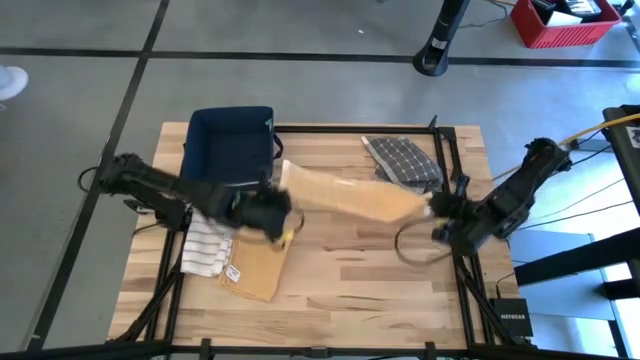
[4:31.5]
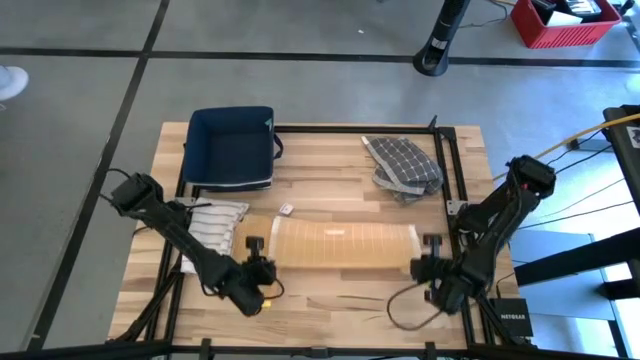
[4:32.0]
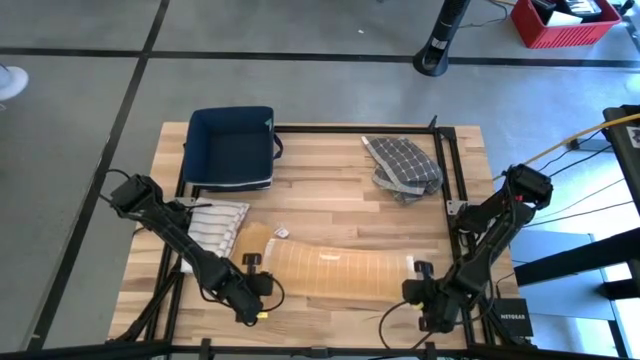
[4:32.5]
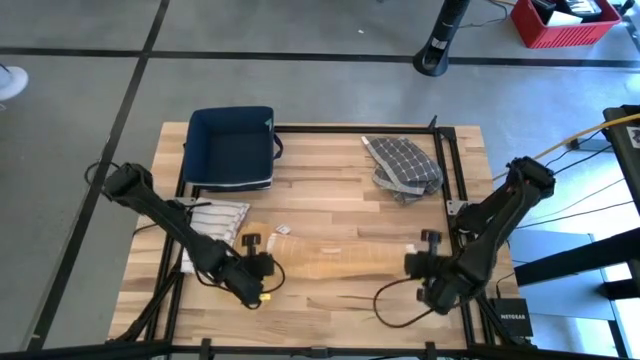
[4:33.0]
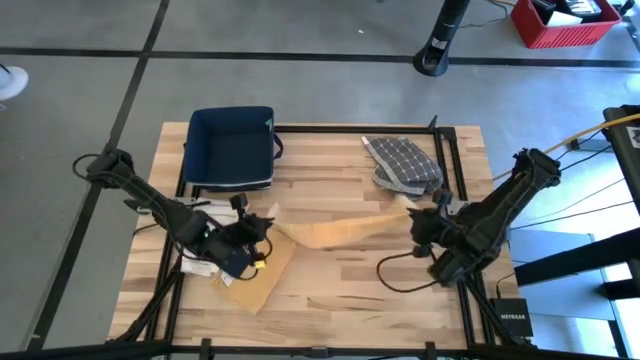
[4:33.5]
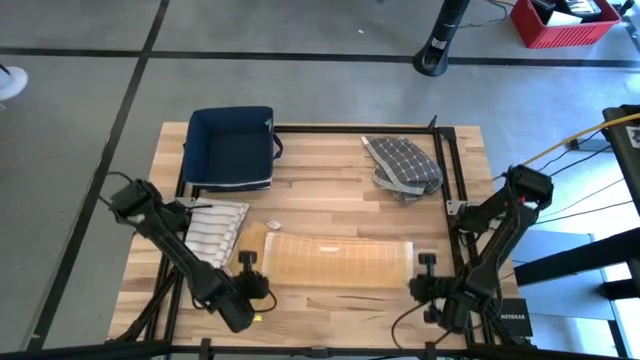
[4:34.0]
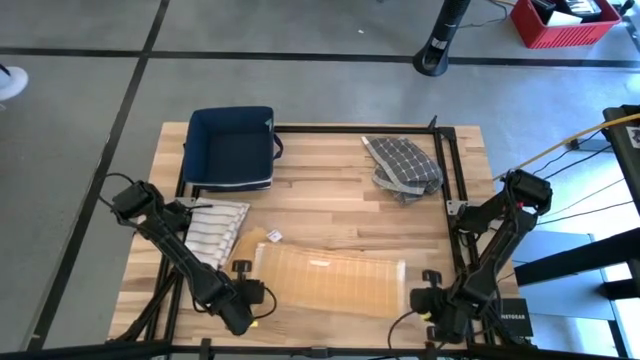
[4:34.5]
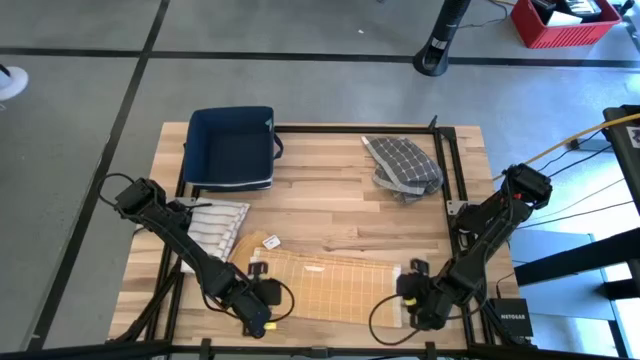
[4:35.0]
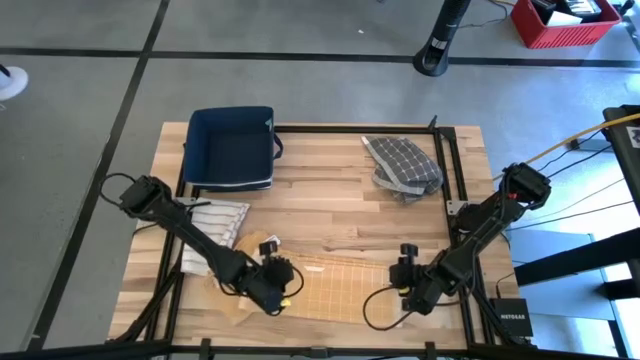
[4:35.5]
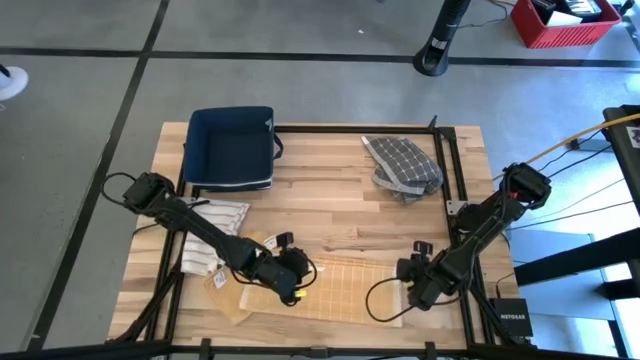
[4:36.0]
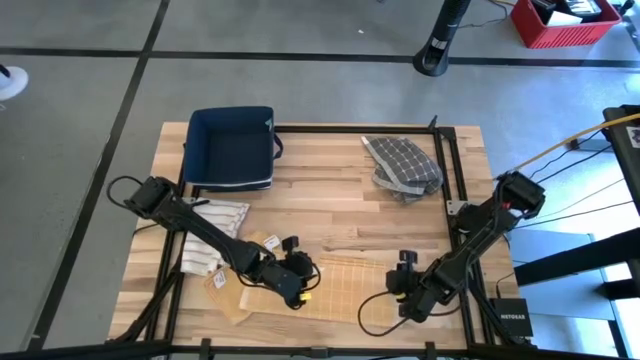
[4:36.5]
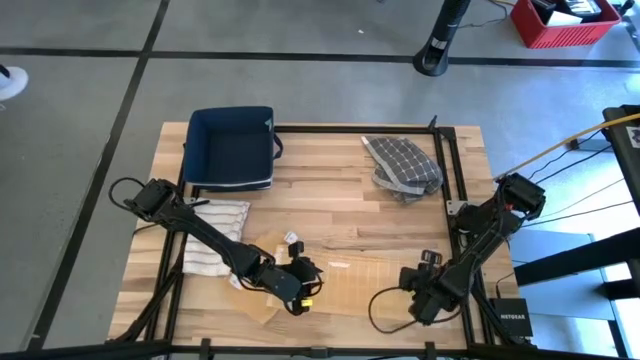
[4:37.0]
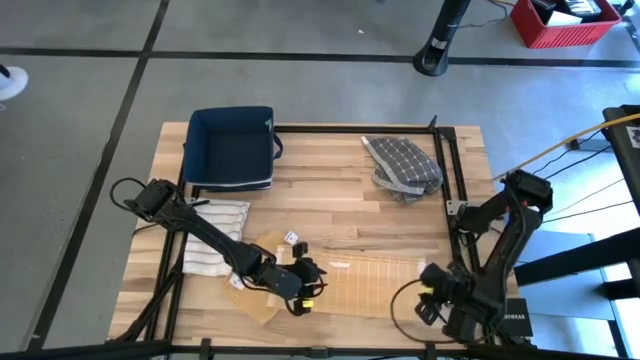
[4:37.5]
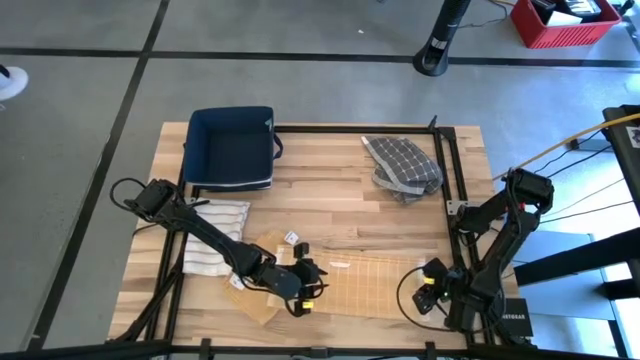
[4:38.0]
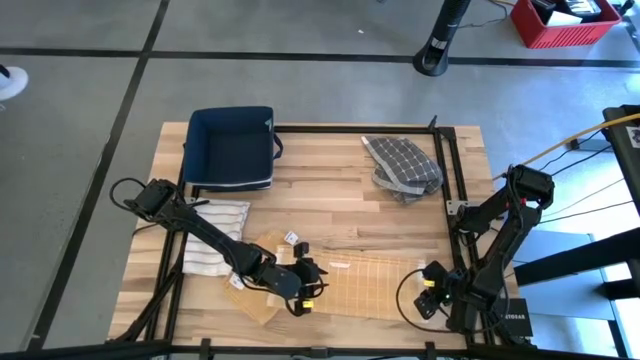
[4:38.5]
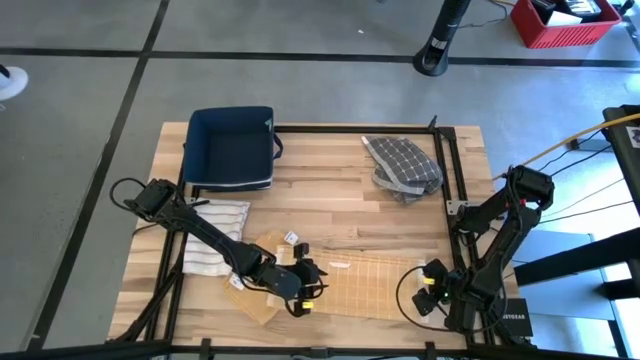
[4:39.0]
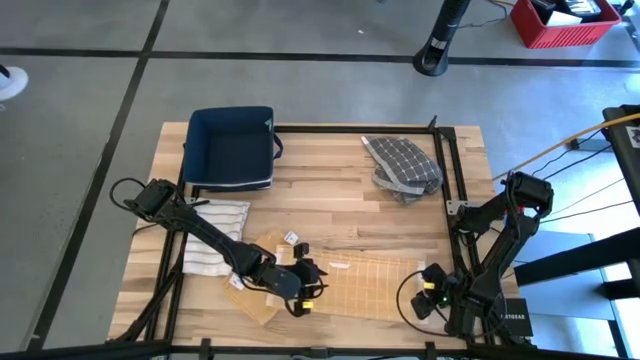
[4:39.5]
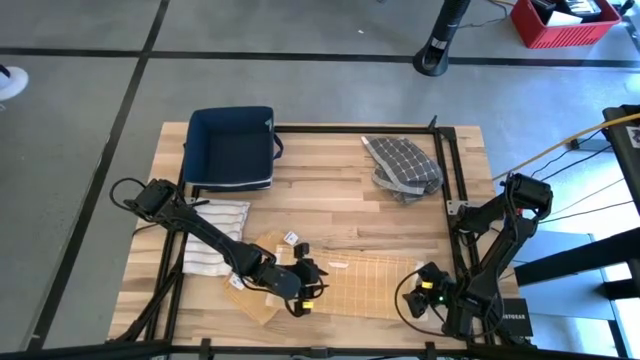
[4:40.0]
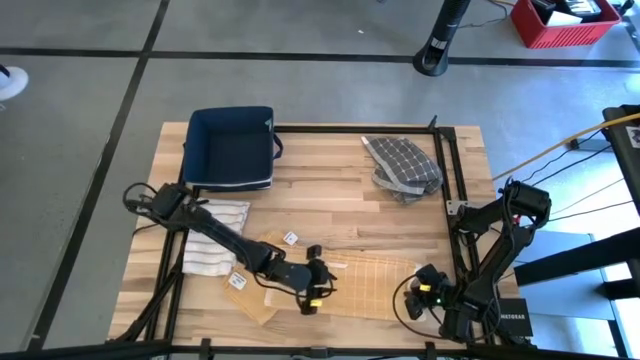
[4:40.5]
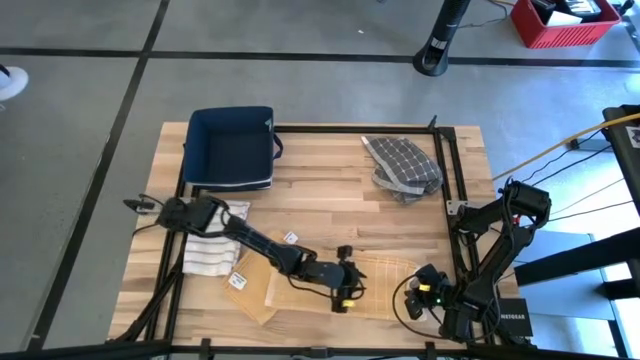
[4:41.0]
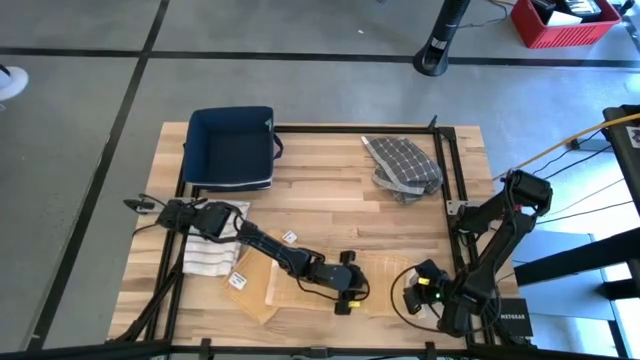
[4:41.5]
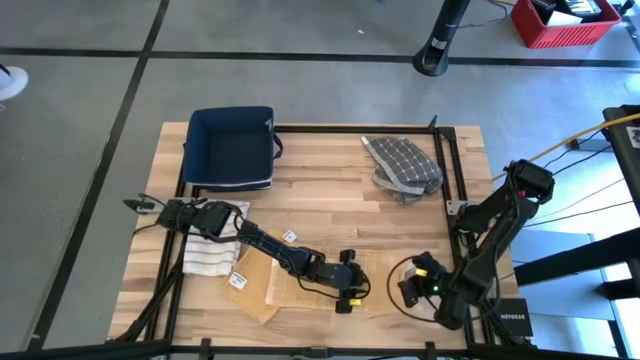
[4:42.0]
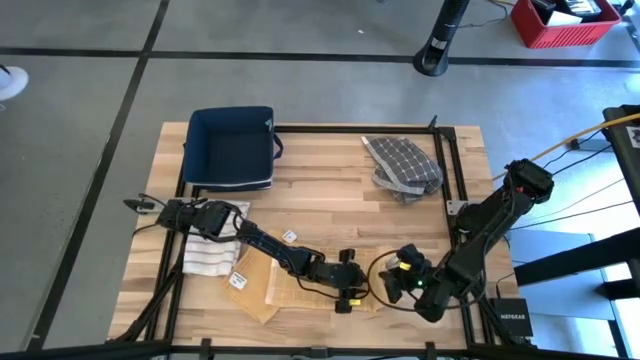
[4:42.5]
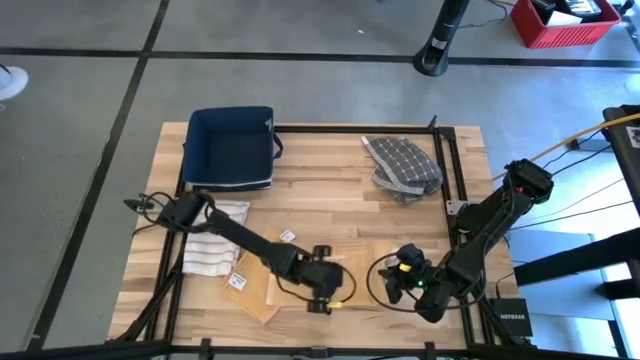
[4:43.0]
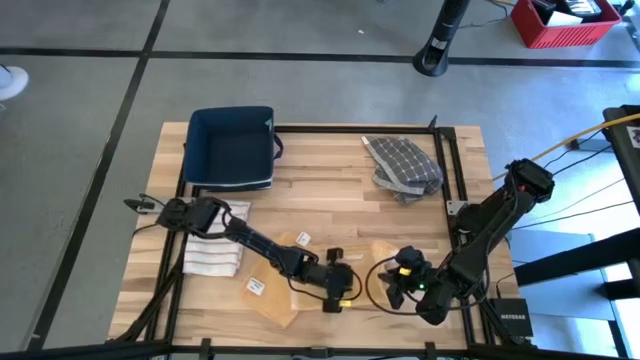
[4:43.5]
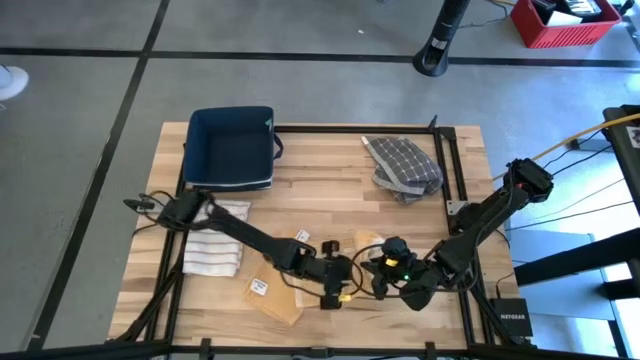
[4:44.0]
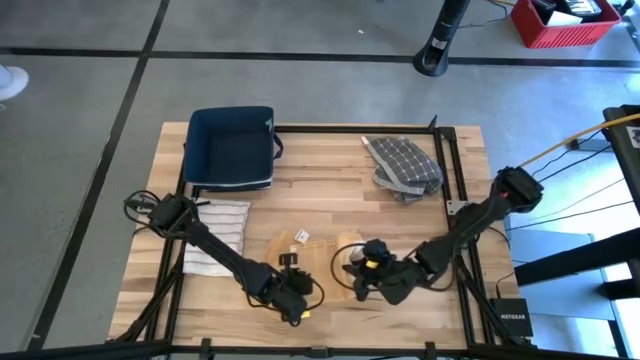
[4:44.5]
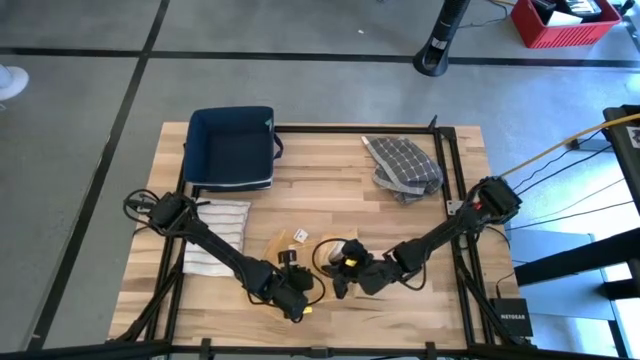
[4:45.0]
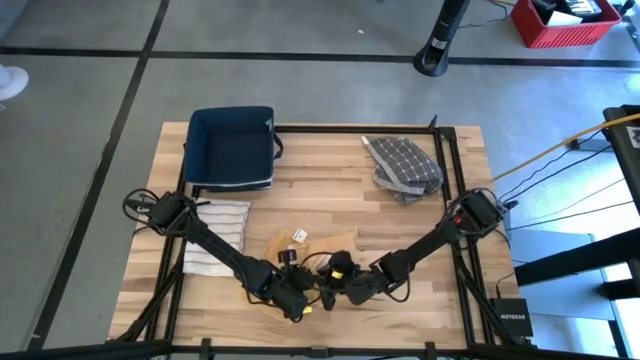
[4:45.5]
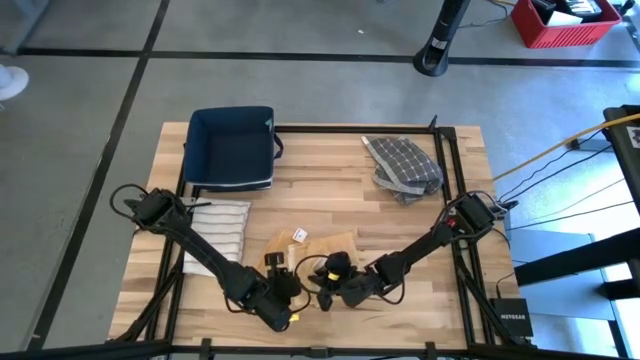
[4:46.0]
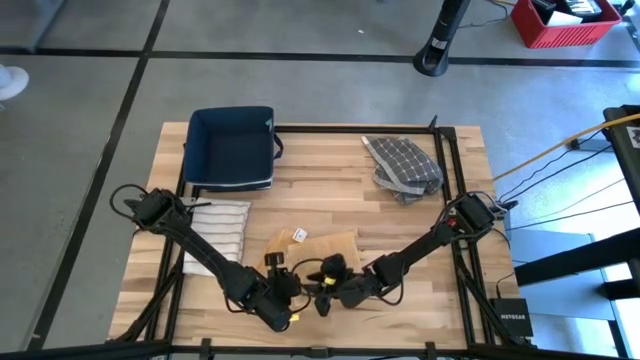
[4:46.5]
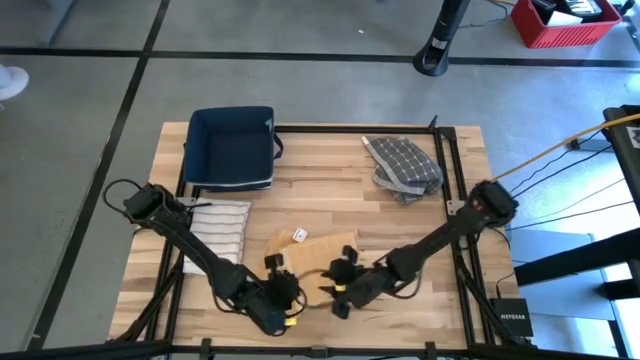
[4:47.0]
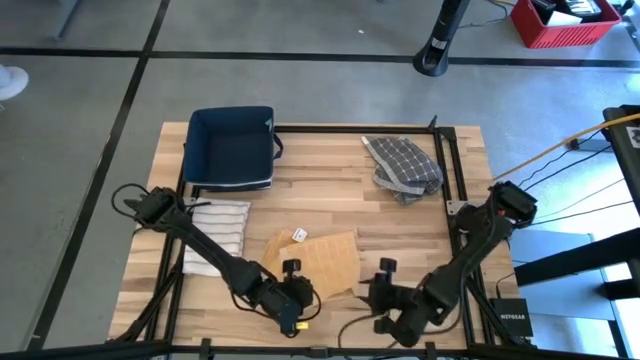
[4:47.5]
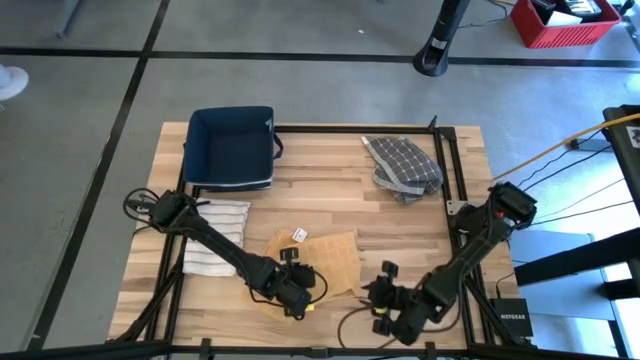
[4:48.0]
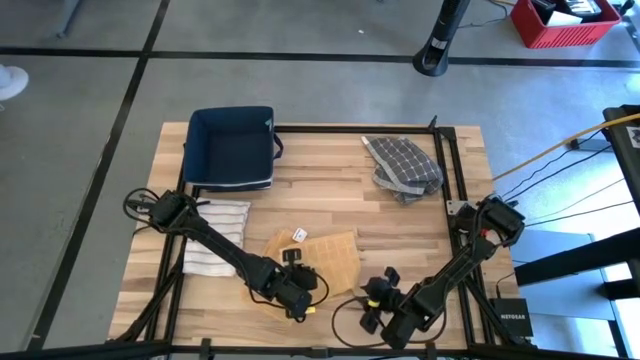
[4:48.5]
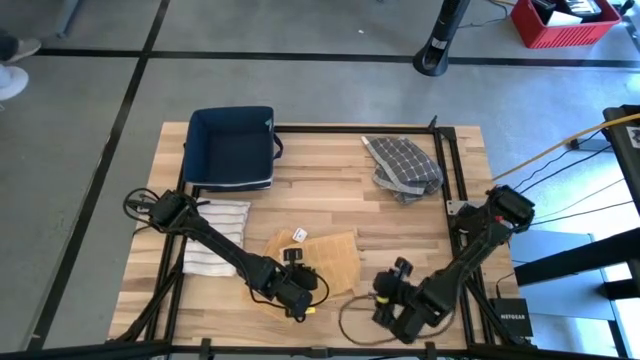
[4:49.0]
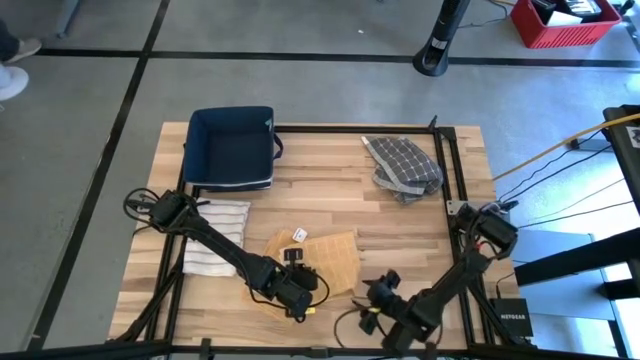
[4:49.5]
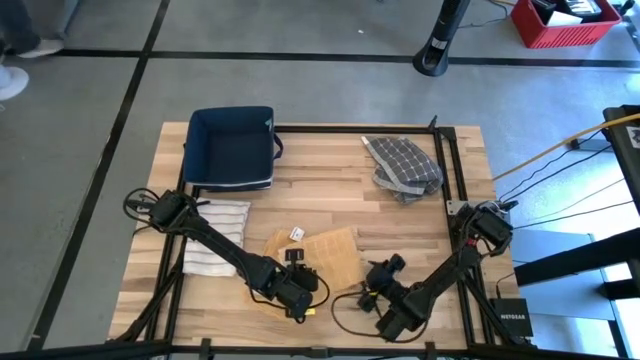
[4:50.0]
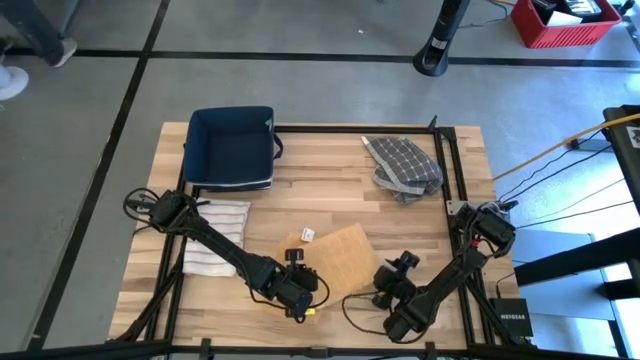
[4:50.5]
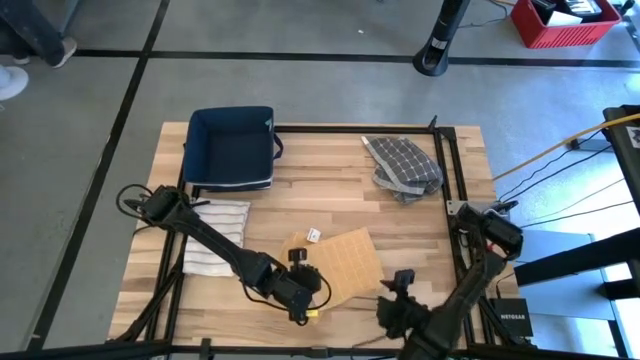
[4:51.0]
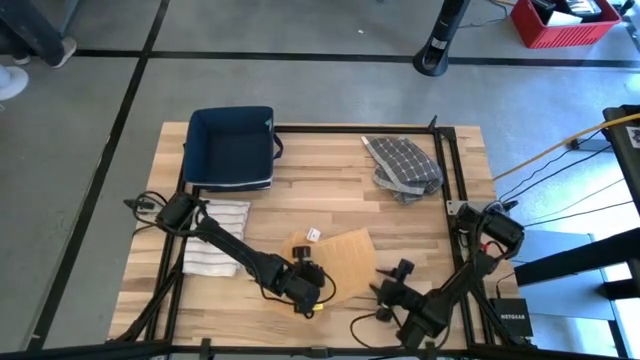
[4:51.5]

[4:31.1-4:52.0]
Task: Fold towel
Fold the orange pattern towel
